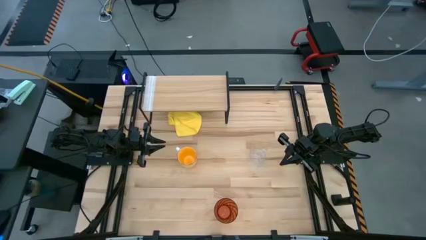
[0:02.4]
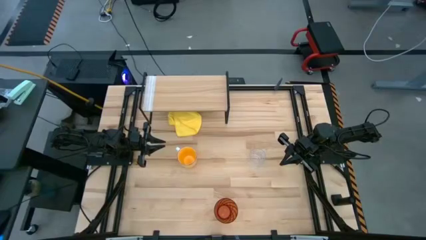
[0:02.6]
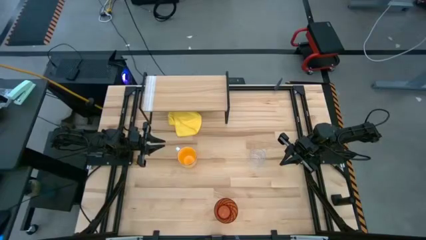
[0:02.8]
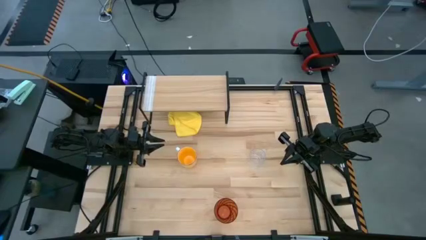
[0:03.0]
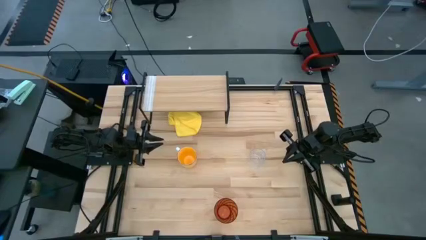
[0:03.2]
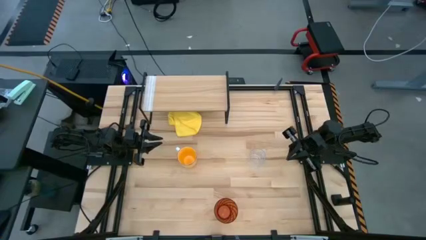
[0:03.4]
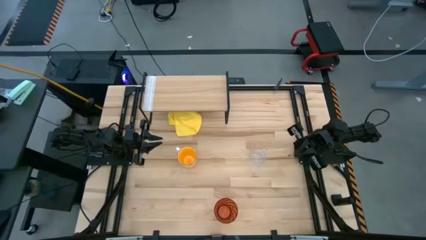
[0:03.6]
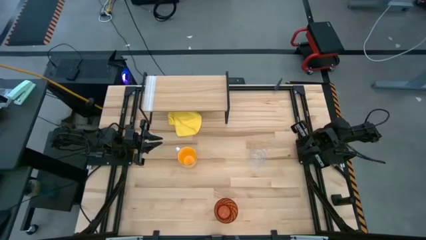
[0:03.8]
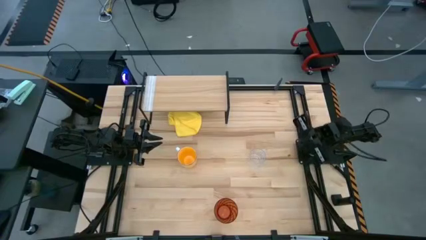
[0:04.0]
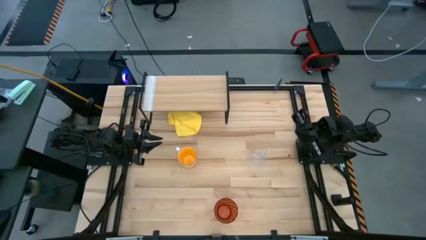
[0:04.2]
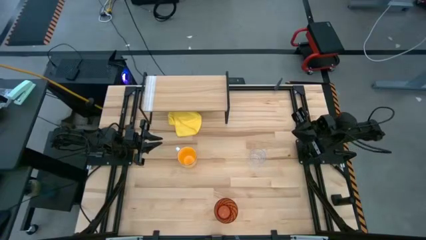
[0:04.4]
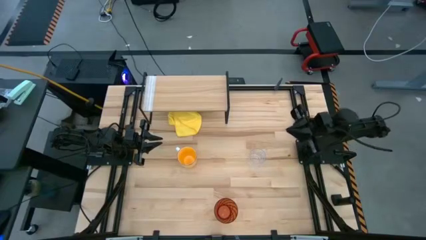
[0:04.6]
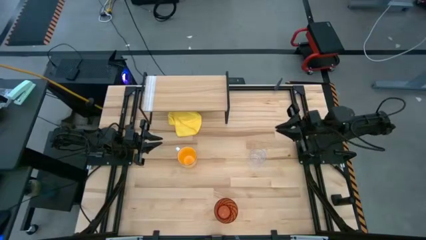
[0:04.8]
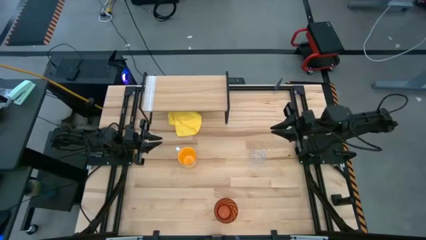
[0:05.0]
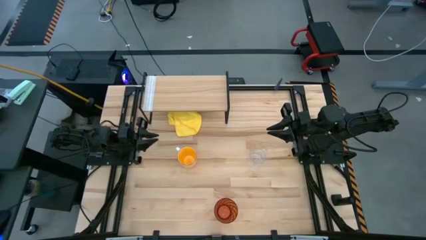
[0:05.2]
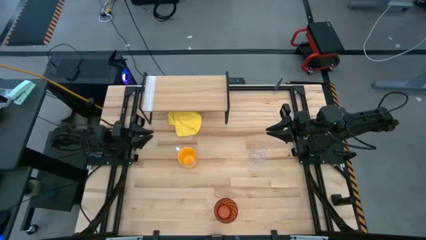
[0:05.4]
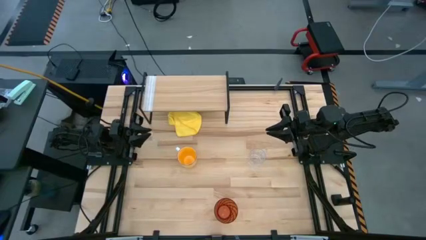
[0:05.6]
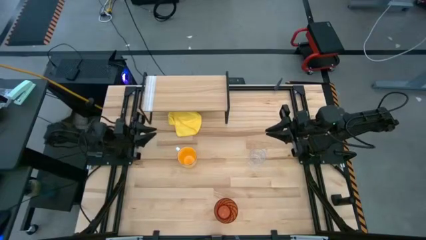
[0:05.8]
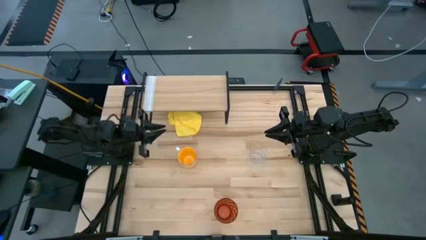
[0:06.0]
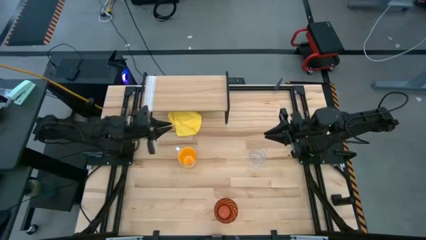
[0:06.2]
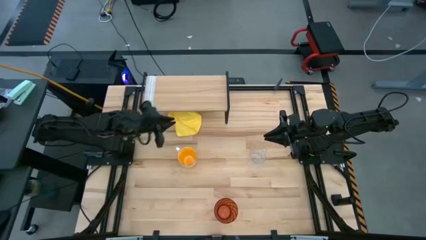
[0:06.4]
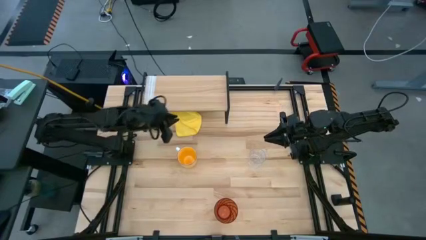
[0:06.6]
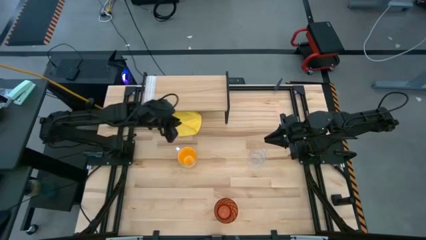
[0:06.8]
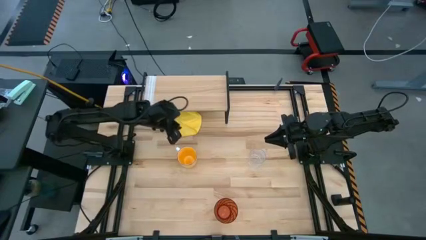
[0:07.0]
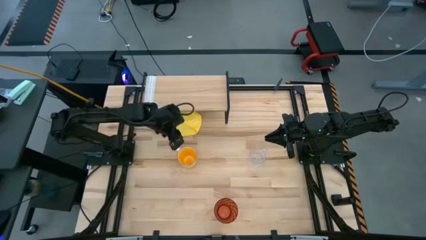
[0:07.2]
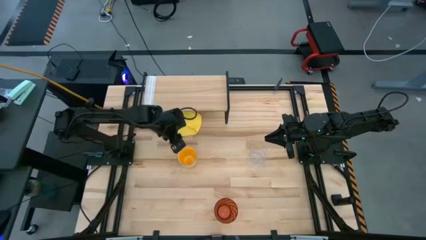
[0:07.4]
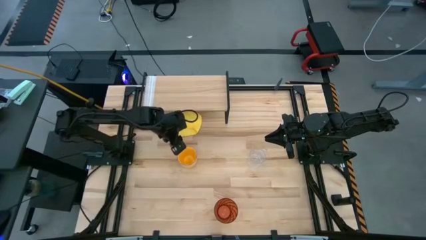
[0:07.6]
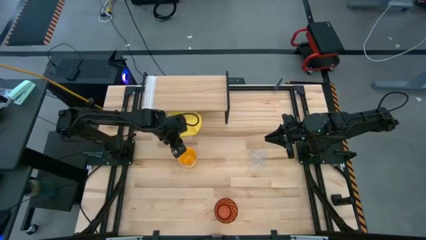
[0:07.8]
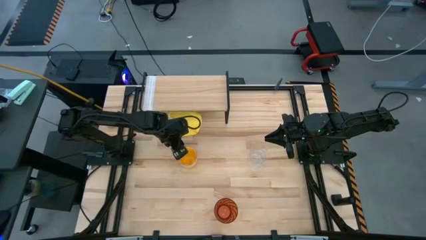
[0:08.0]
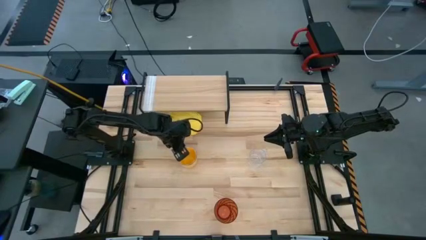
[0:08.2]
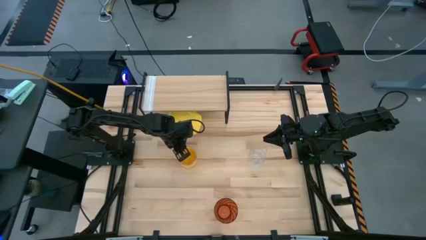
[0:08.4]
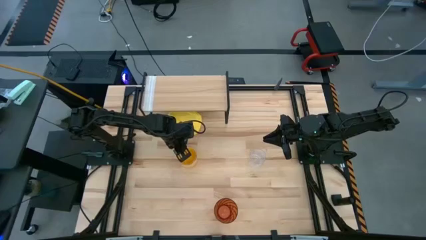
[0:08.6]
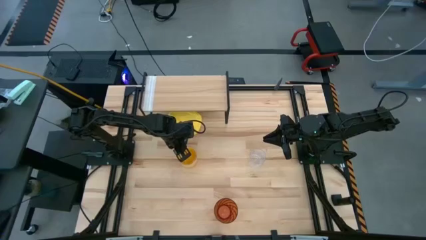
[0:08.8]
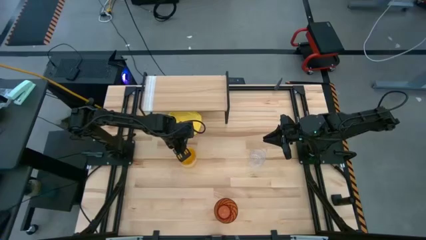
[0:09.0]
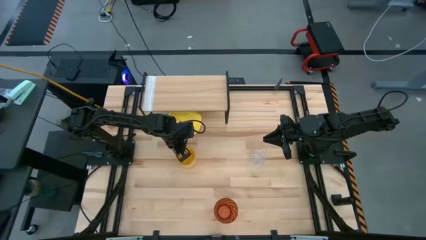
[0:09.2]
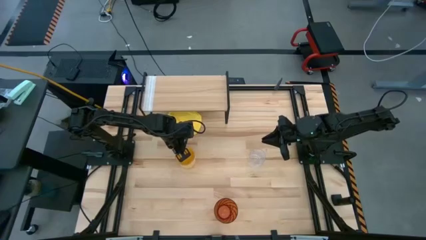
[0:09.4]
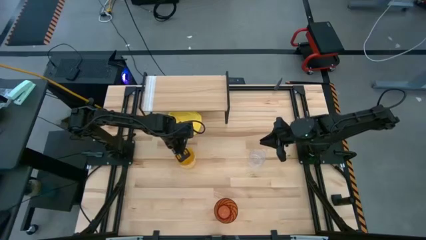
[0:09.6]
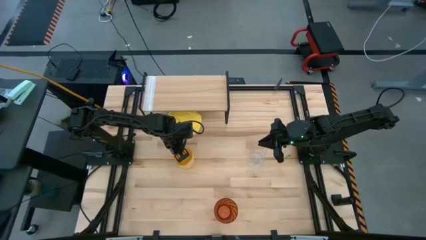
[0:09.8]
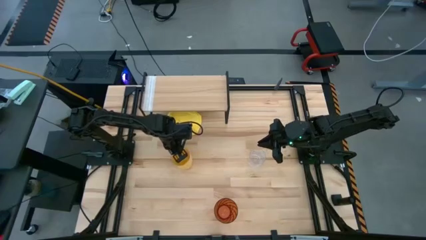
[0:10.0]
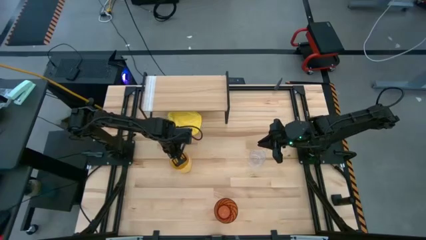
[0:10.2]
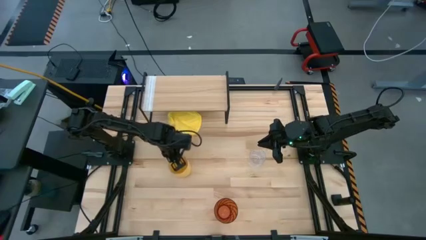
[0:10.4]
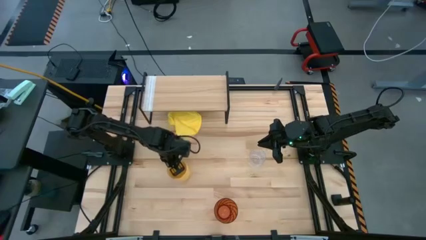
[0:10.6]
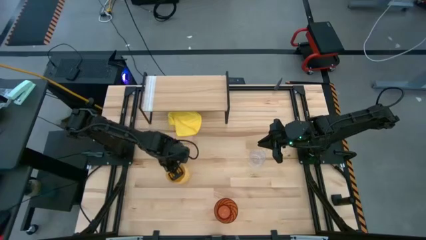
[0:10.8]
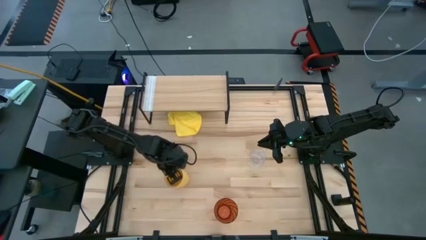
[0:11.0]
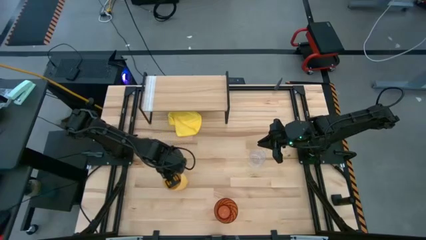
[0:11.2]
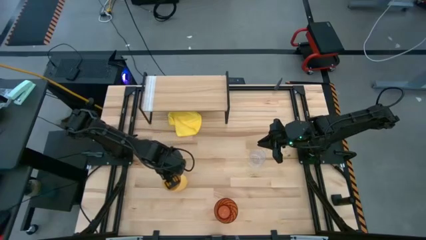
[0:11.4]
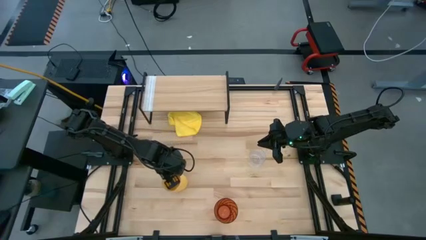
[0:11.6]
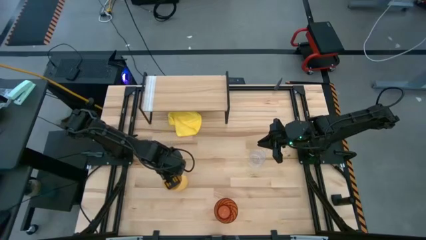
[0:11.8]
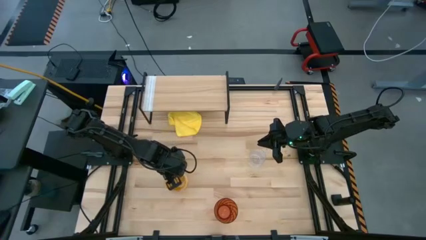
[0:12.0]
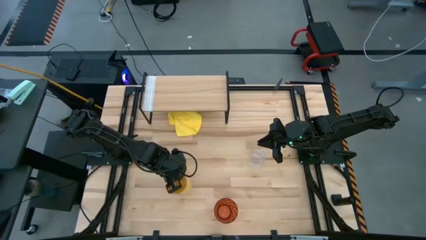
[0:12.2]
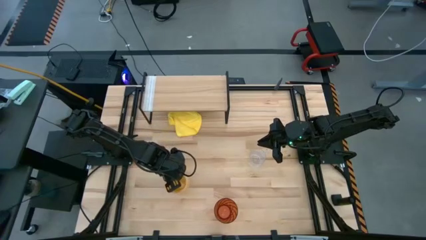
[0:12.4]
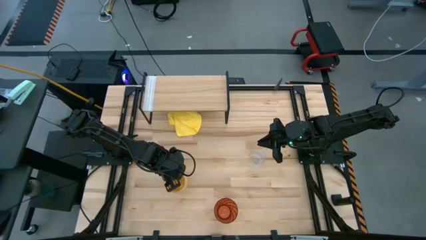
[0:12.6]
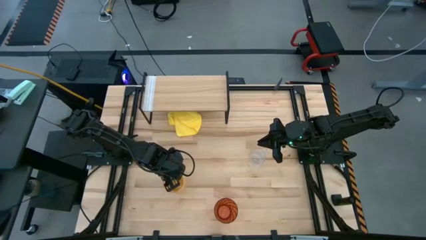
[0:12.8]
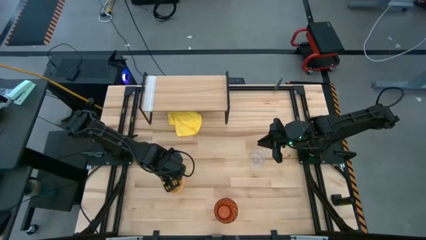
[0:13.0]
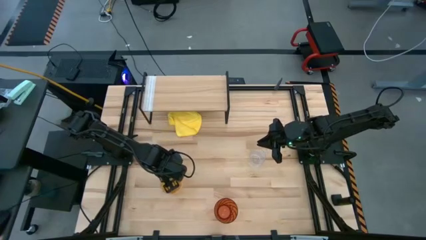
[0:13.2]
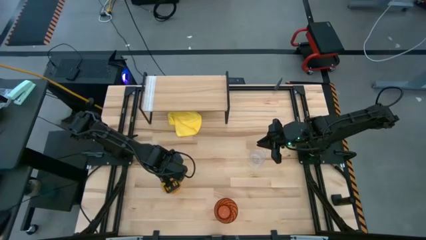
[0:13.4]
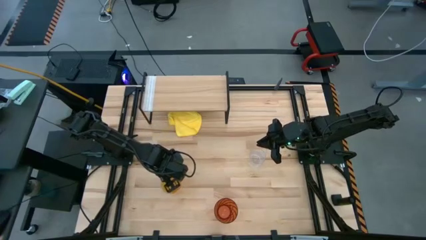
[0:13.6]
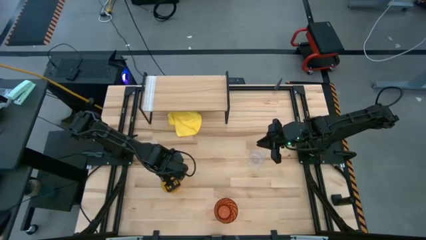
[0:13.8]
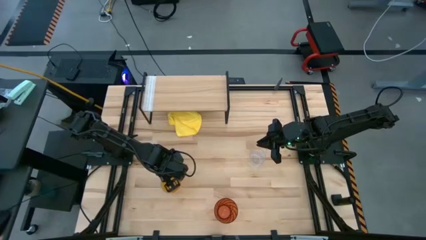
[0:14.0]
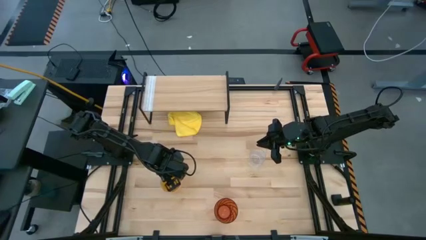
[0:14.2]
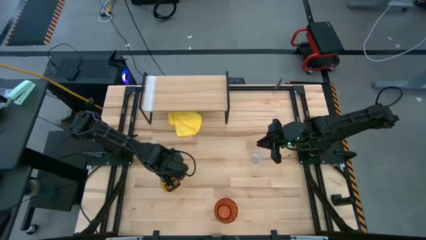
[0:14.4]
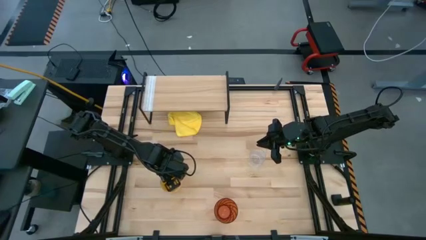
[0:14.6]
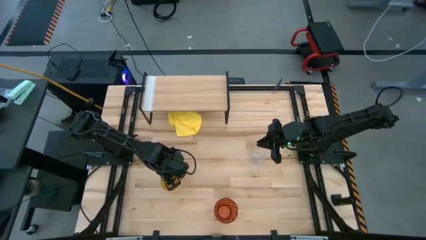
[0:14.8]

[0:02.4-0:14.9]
Task: Stack small to large cups/mugs on shelf
Move the yellow mug to the center of the table

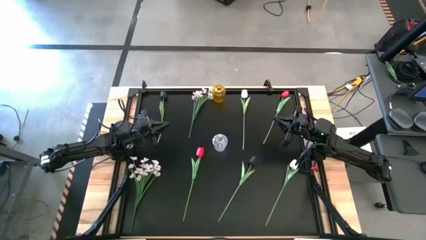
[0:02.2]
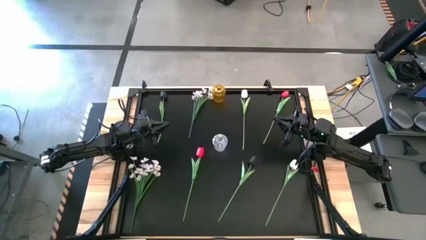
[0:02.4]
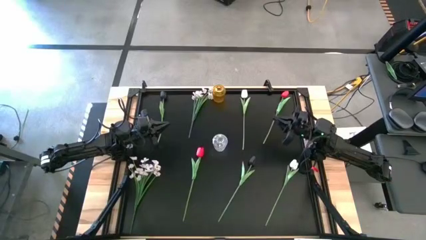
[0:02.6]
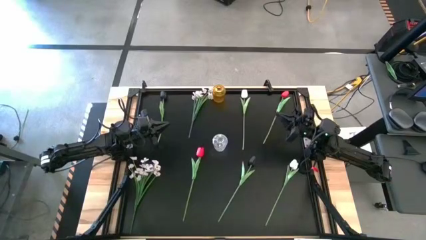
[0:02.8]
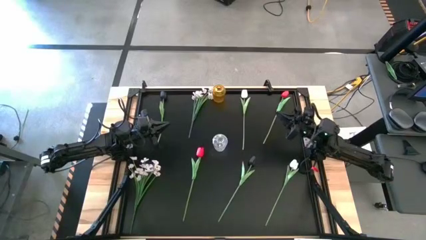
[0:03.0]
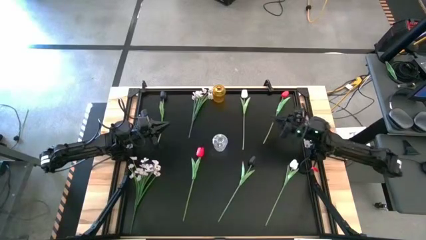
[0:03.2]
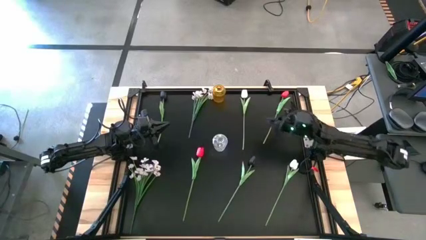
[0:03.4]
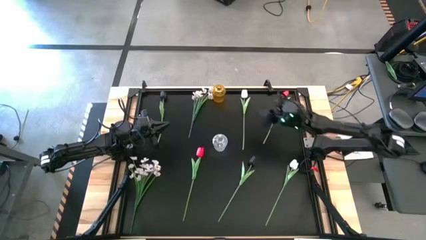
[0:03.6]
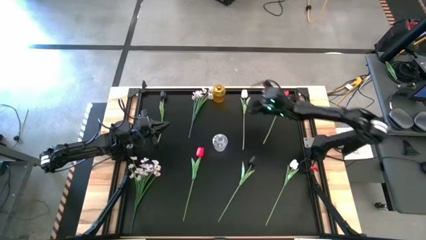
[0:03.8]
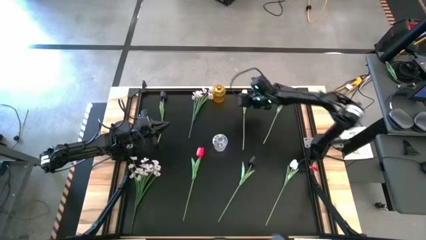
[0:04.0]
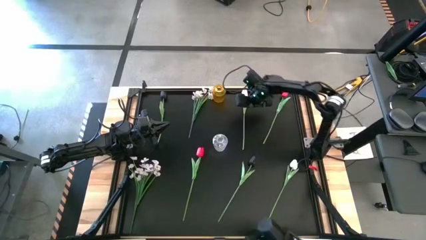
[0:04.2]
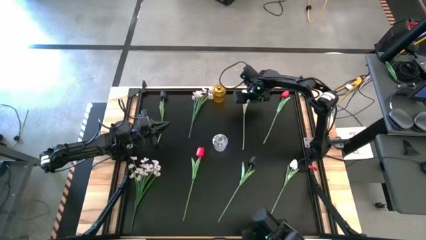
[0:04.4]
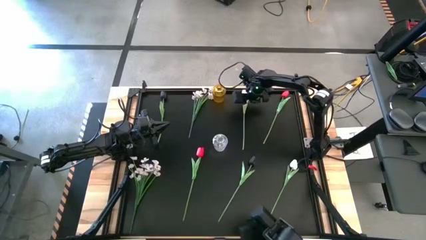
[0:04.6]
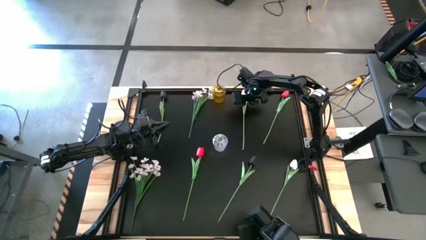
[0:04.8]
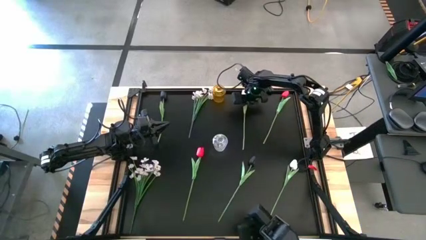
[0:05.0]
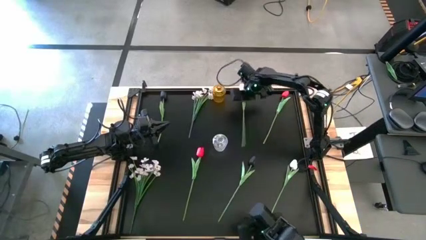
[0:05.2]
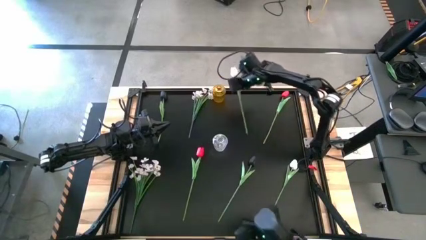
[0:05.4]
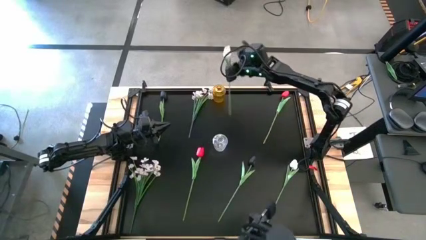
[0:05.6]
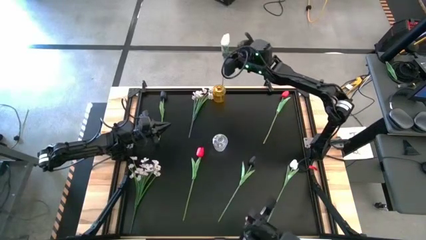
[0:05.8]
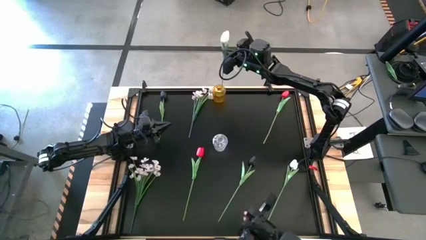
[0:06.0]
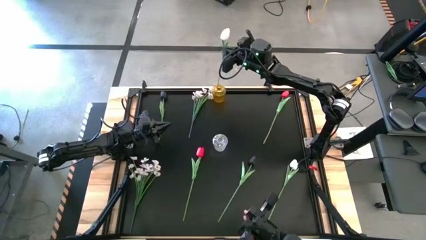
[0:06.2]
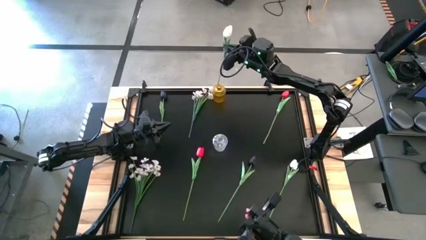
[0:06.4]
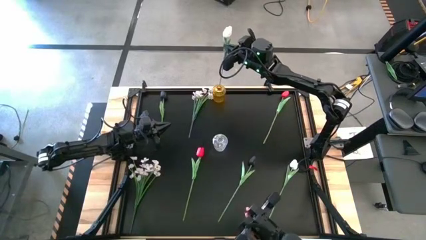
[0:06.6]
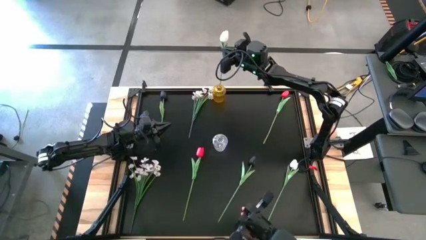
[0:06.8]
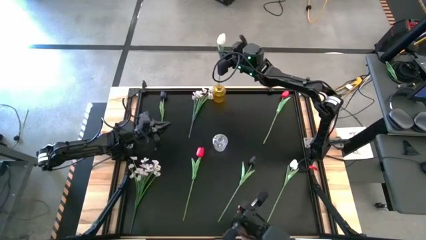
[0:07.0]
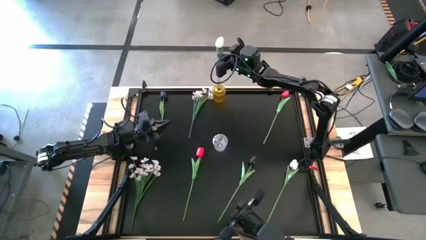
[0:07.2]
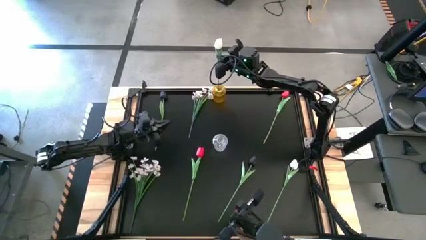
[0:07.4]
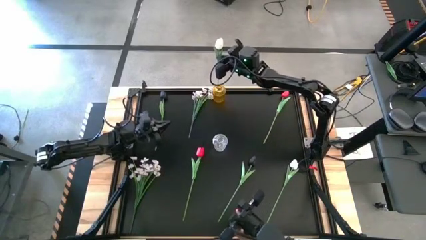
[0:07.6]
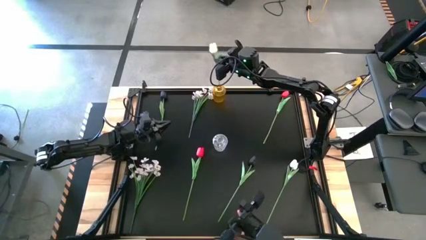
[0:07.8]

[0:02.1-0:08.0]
Task: Sort flowers into vase by color
Put the top white tulip into the yellow vase
